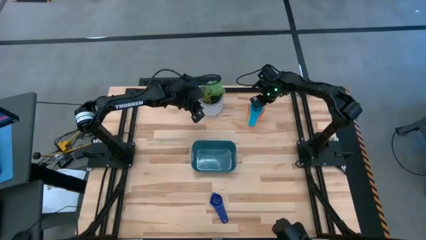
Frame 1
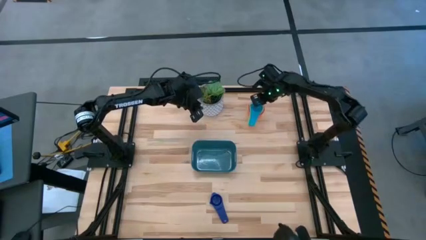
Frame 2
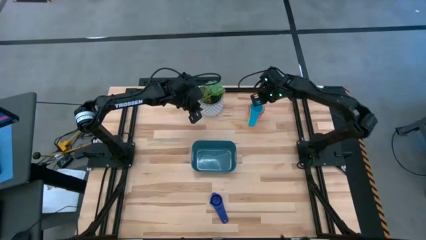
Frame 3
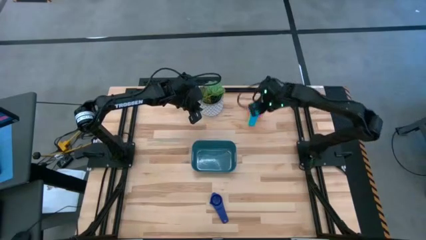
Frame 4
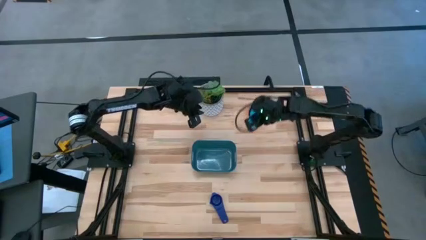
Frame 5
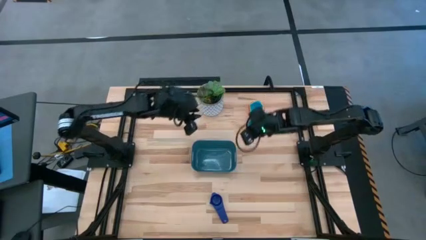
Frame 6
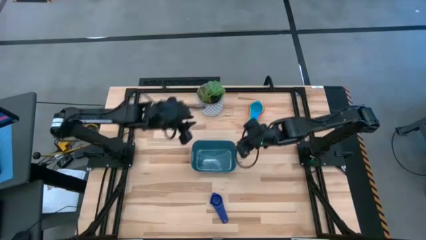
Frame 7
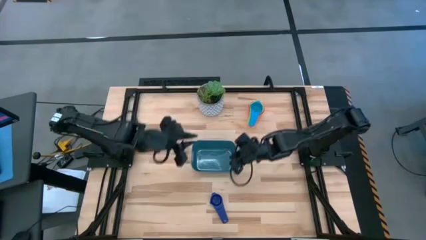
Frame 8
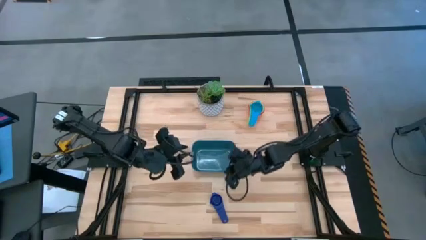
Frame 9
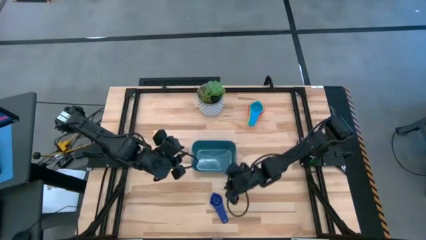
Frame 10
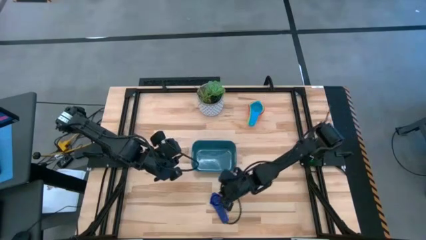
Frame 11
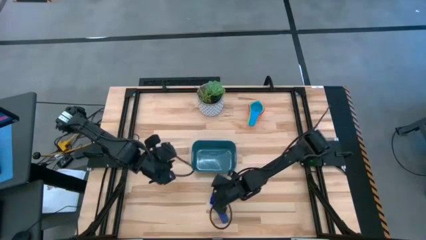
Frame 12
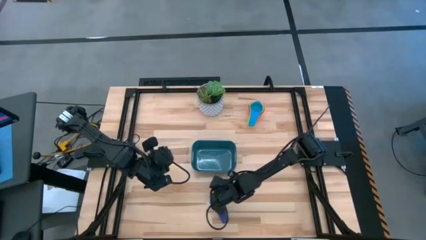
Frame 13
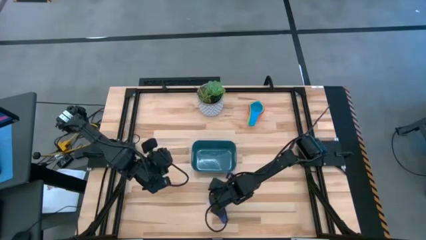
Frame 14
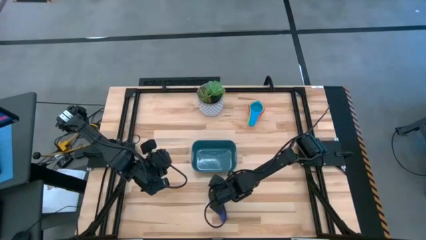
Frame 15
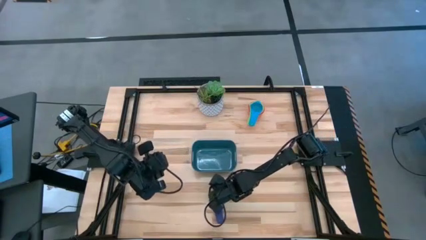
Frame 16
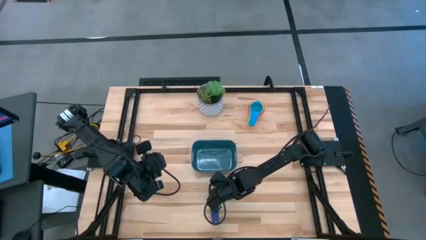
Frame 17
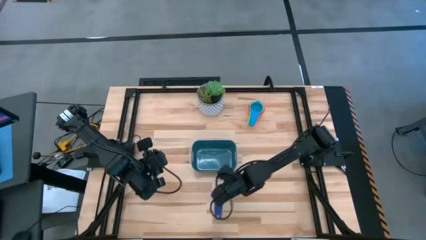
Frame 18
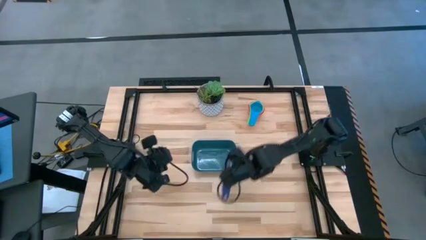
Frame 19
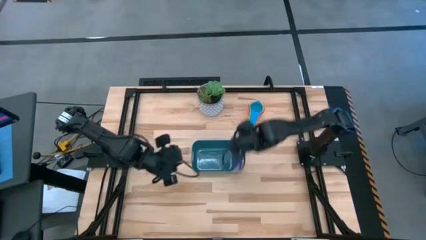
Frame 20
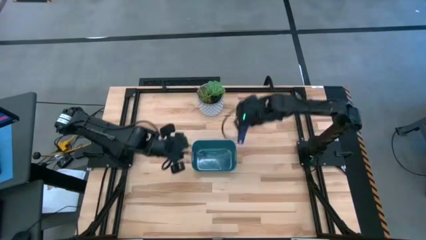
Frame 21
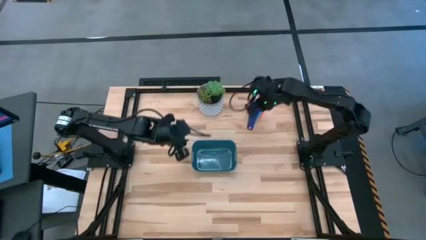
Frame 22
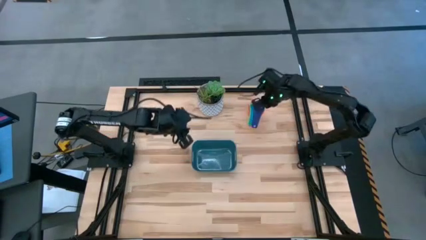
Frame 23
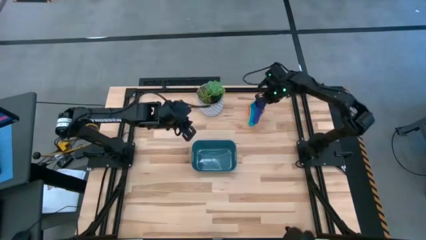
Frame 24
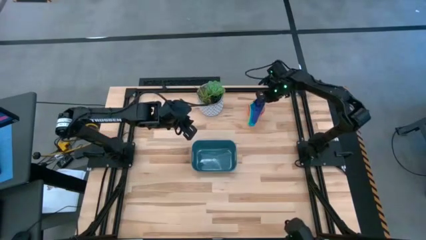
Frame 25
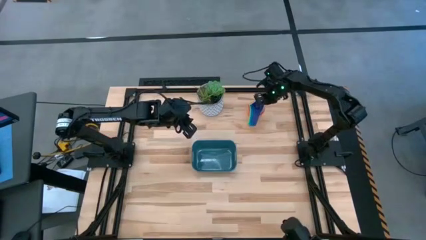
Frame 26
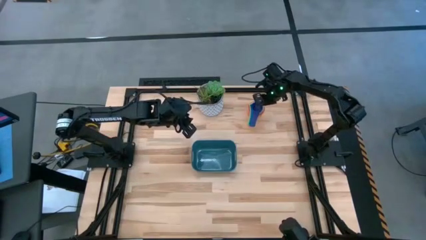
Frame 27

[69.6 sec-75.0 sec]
Task: Nest measuring cups in basket
Stack the dark blue measuring cup on top of the light blue measuring cup

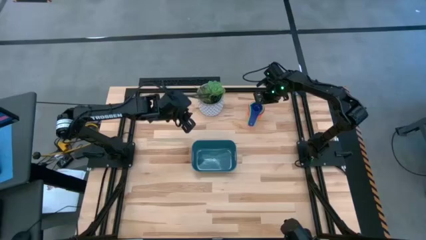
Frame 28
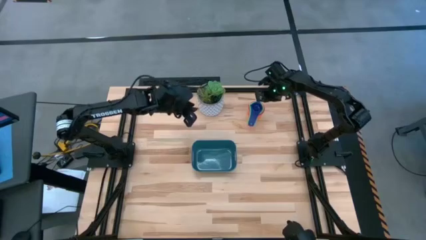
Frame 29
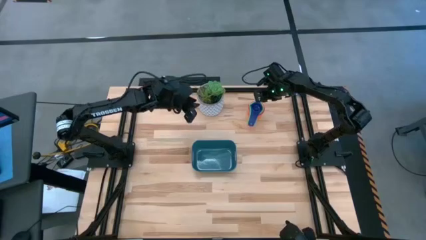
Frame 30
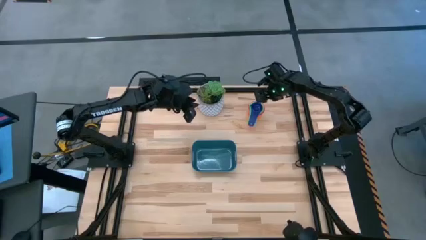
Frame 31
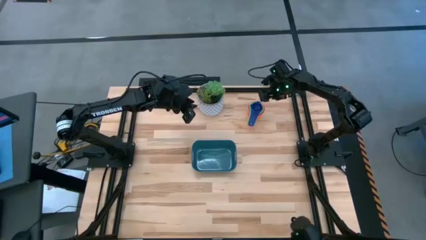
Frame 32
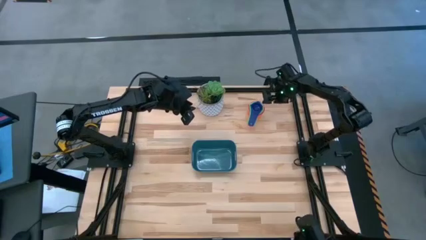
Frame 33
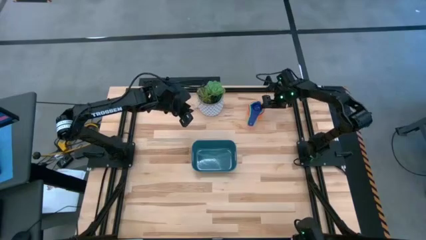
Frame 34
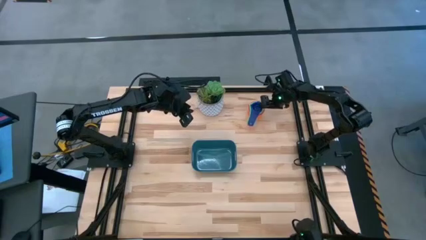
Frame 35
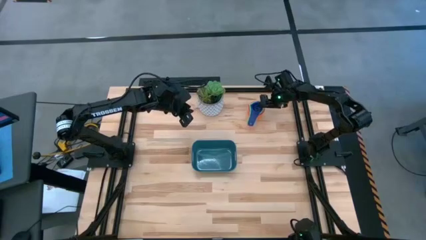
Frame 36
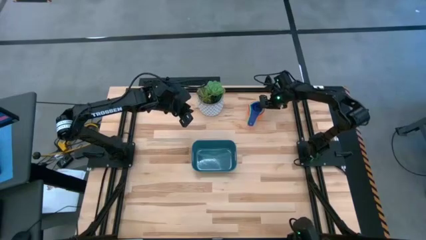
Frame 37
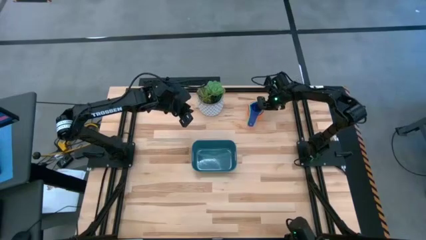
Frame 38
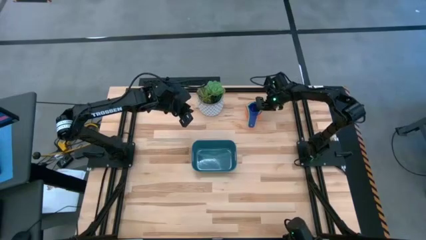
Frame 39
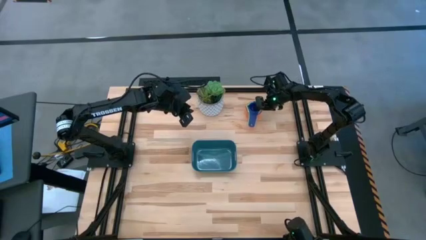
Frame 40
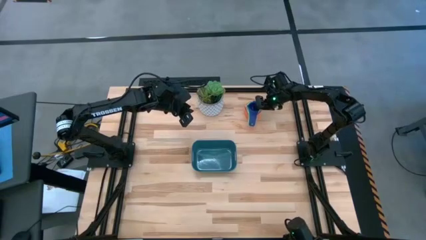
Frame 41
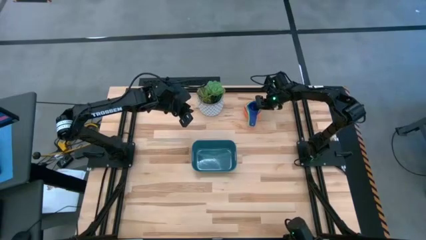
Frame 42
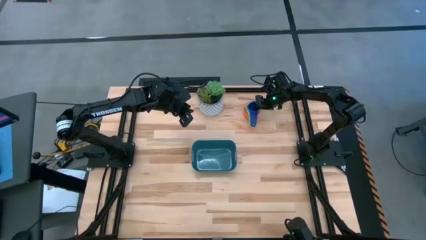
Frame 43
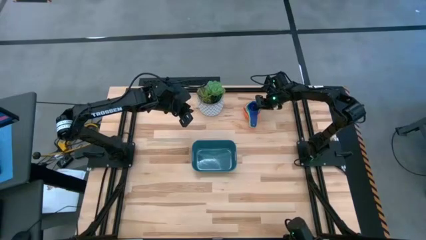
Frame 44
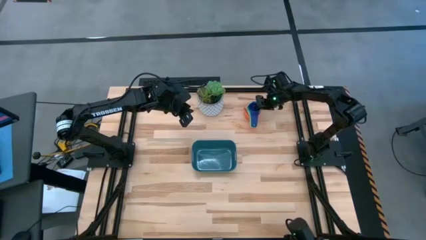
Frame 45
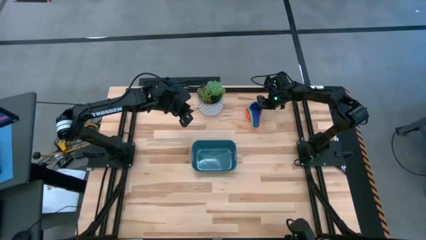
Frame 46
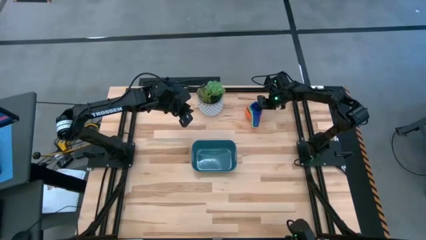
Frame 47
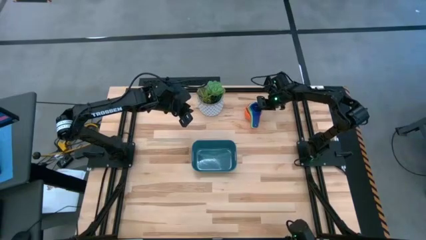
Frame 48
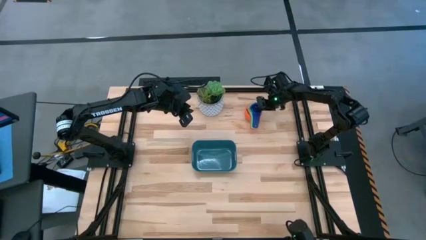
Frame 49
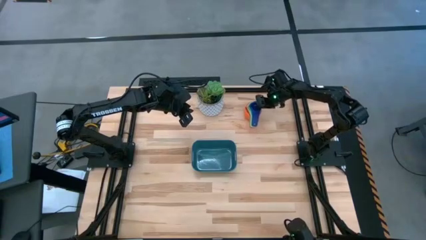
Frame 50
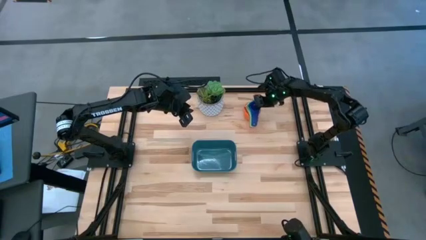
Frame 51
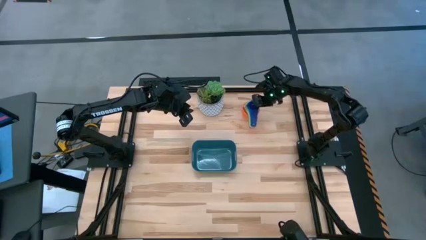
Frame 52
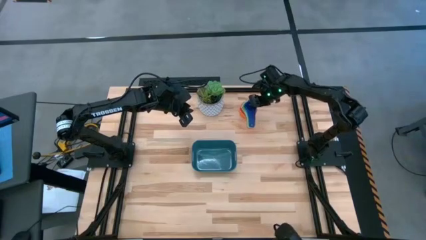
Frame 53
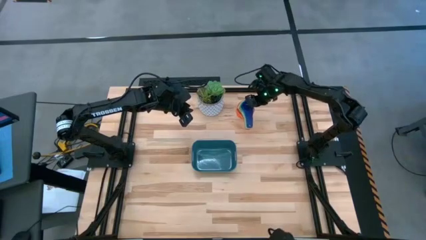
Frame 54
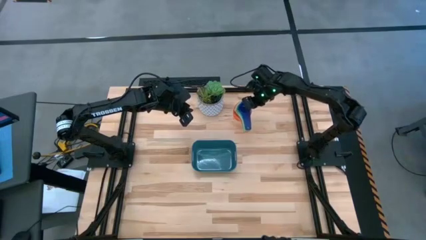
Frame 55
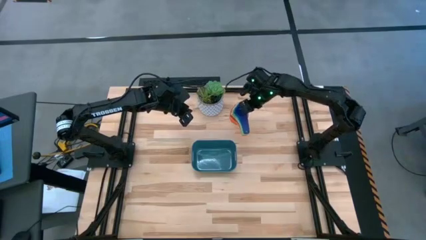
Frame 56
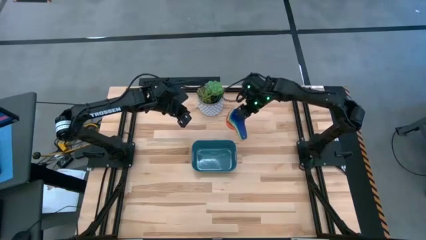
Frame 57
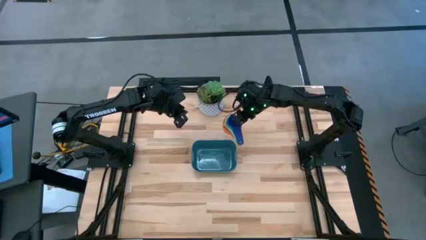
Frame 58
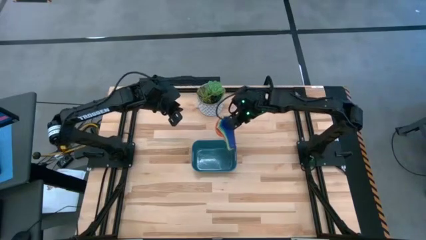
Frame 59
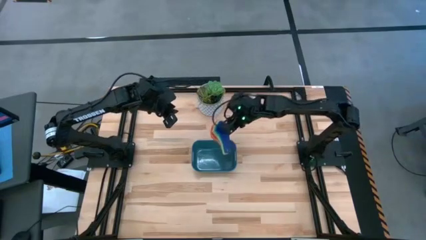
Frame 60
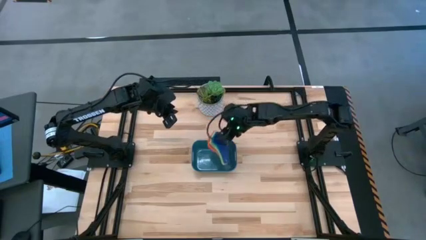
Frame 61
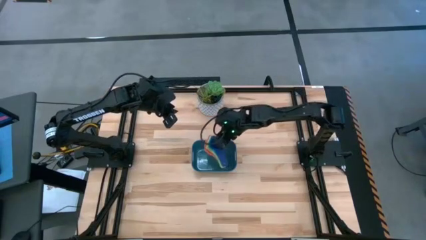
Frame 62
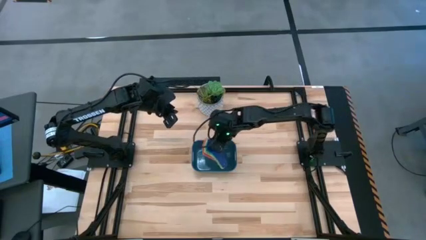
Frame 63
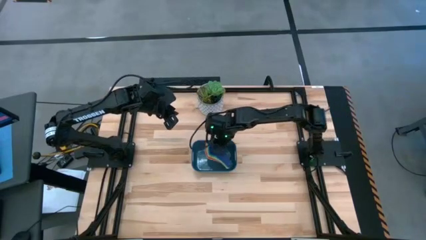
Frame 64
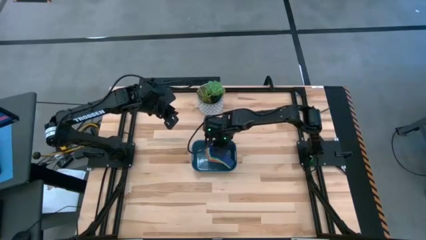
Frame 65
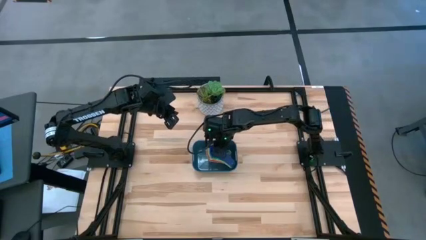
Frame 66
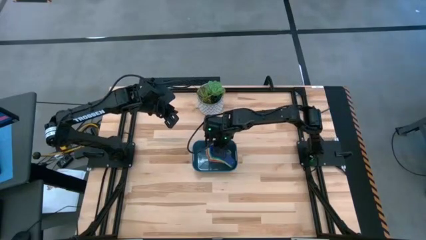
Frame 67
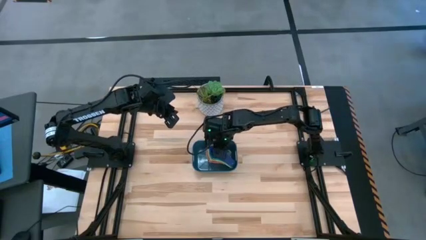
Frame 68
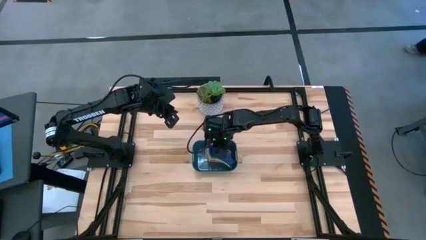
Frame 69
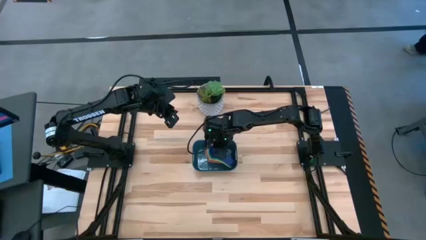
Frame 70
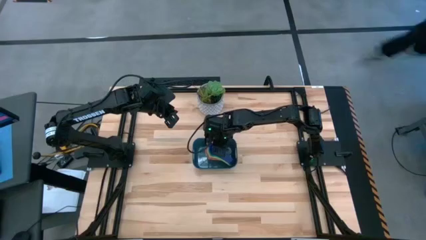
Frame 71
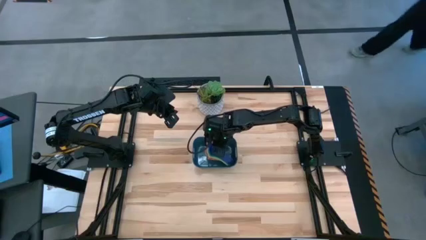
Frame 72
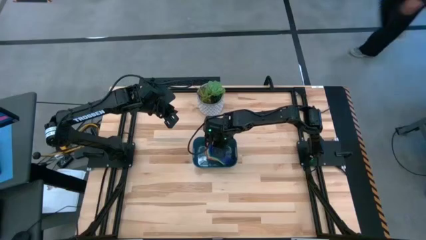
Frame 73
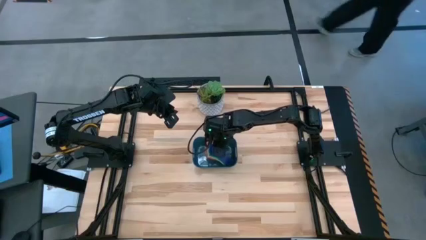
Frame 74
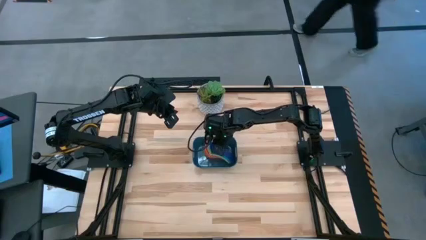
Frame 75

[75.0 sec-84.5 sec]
Put the nested measuring cups into the blue bin
